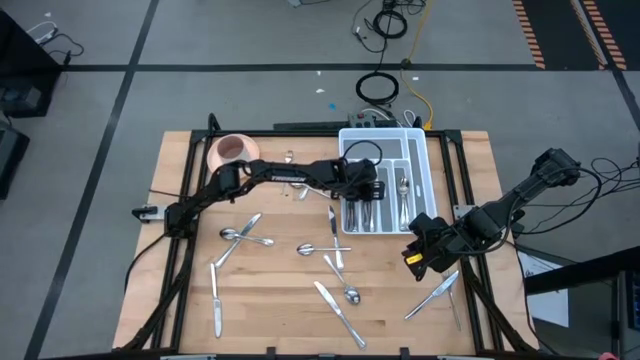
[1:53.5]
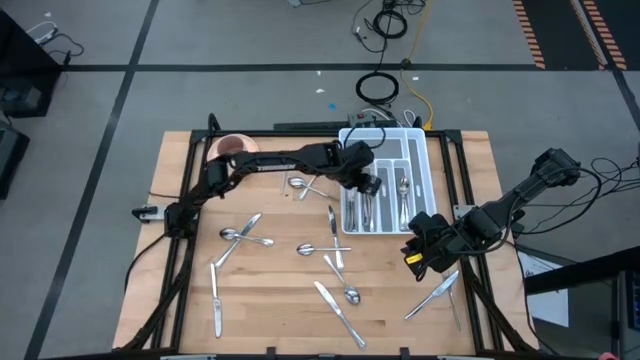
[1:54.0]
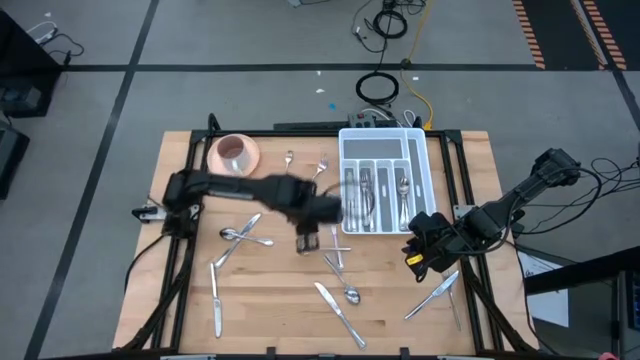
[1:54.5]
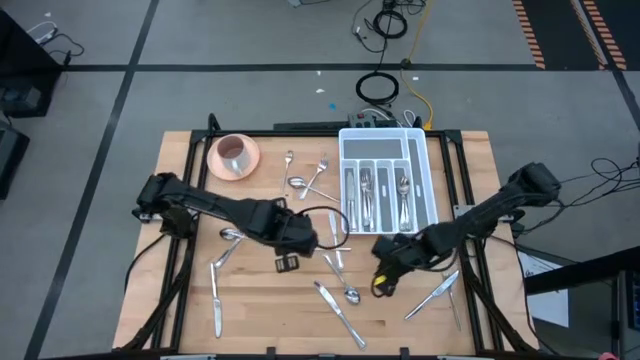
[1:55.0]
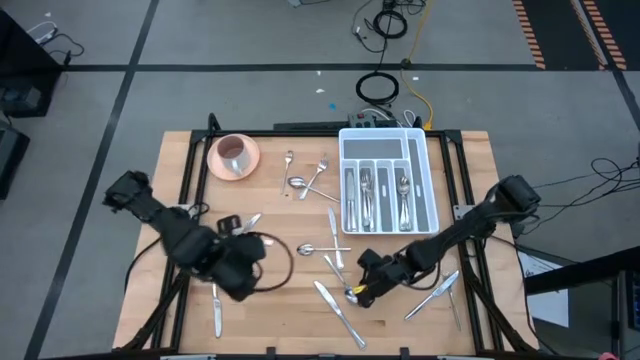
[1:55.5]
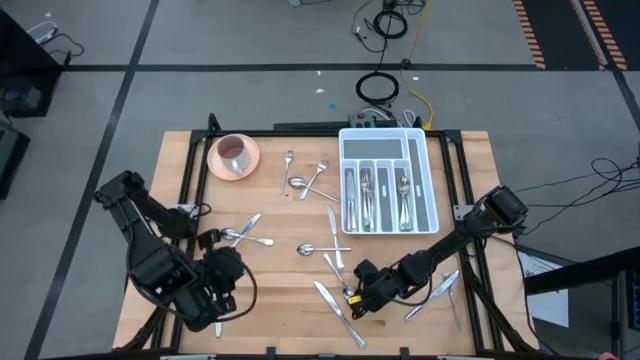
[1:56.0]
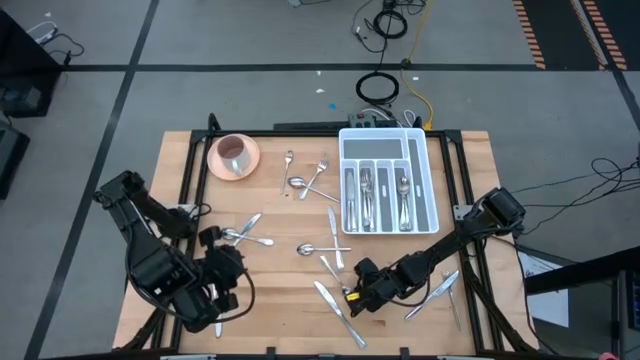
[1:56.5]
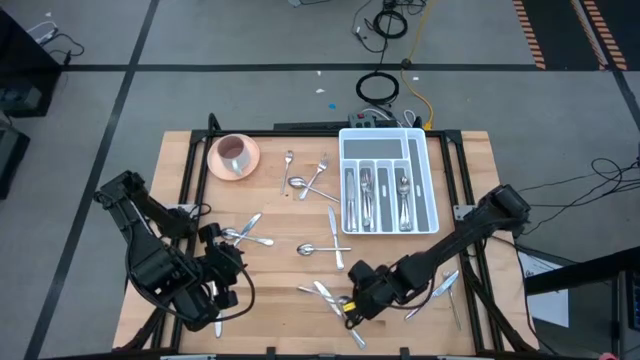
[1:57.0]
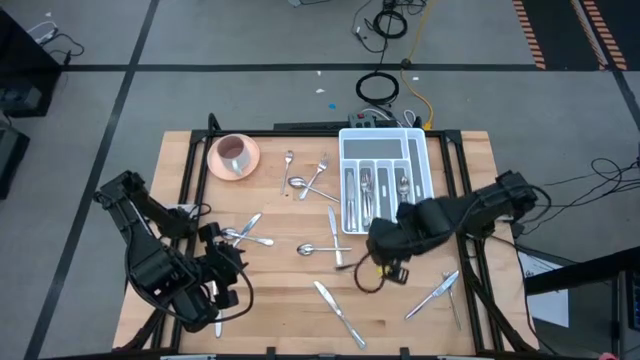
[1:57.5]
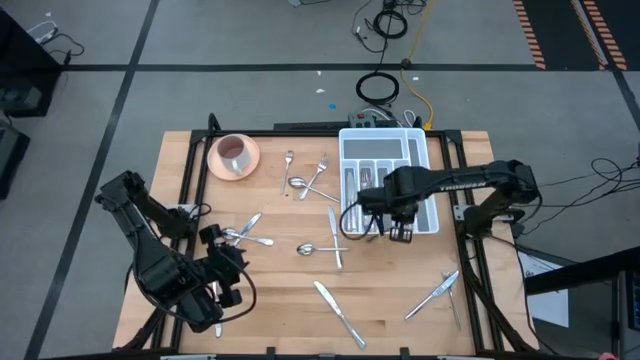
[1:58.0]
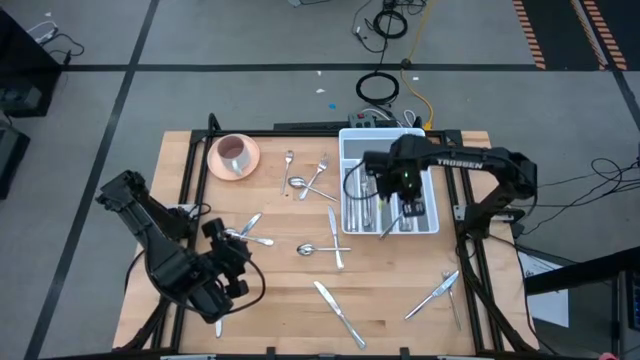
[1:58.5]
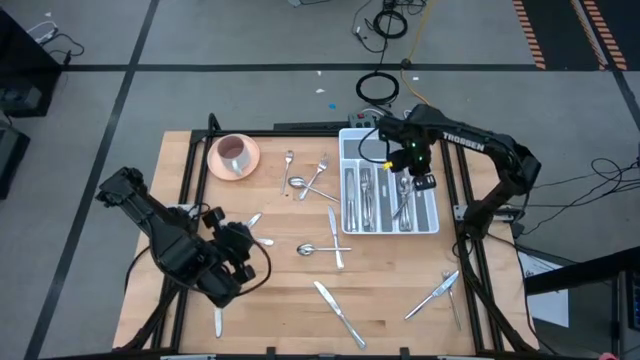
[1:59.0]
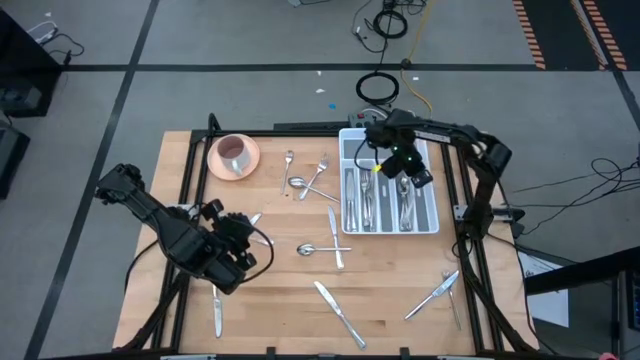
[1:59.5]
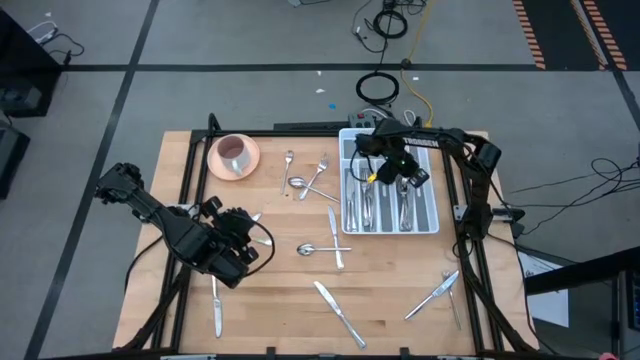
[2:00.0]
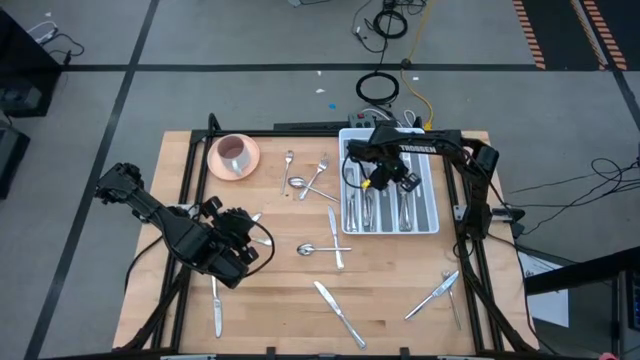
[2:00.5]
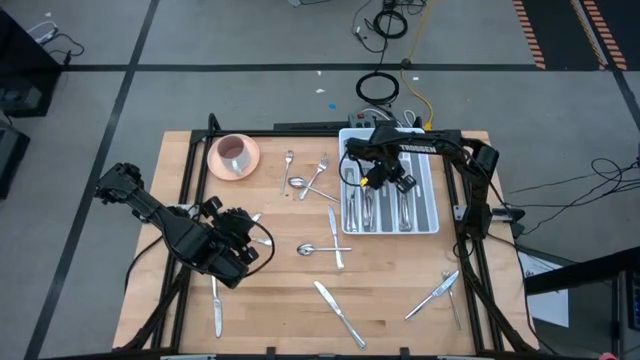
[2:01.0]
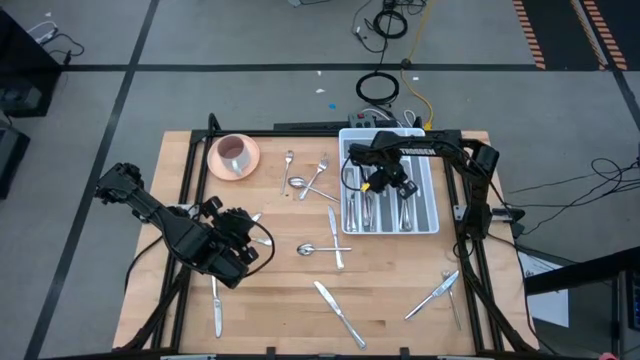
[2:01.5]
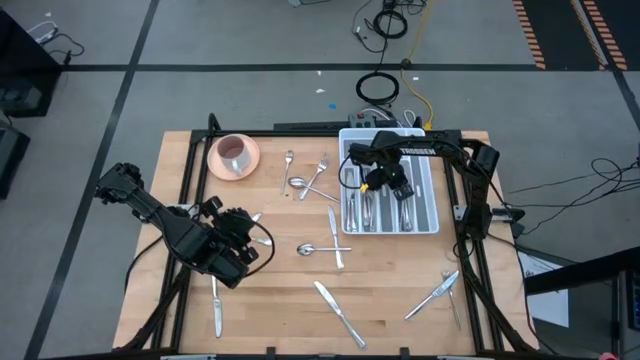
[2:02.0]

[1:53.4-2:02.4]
Task: Sort silverware
Put the silver spoon into the white silverware tray

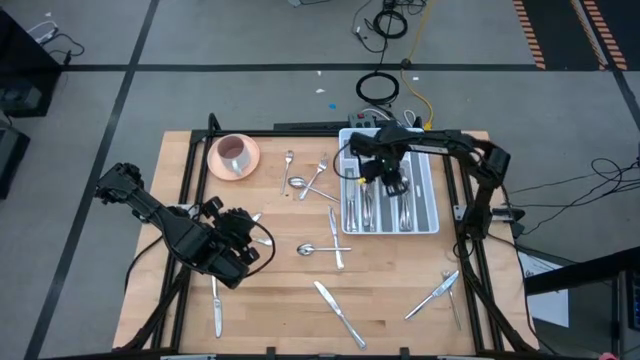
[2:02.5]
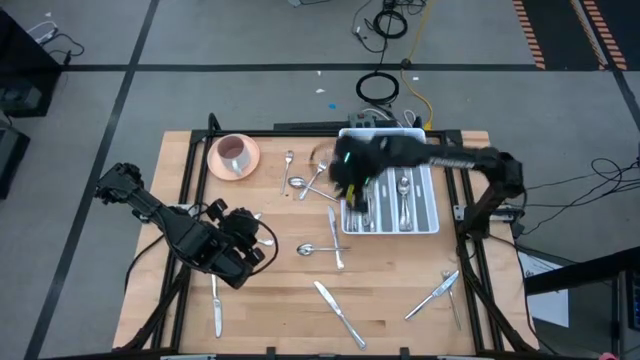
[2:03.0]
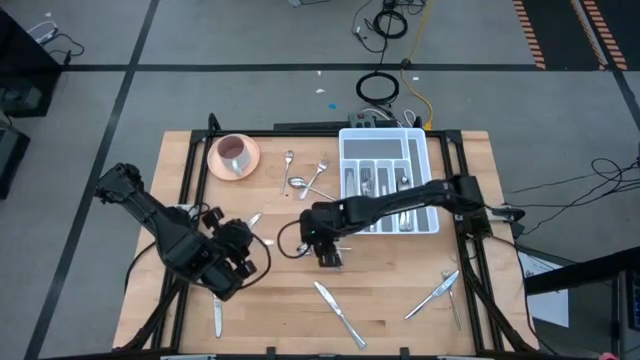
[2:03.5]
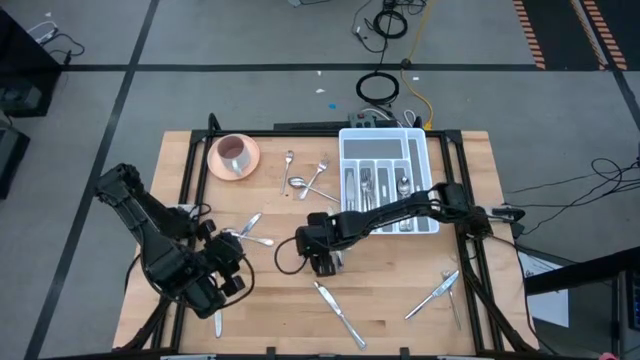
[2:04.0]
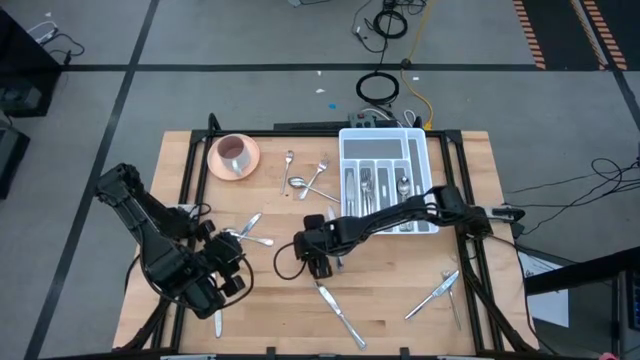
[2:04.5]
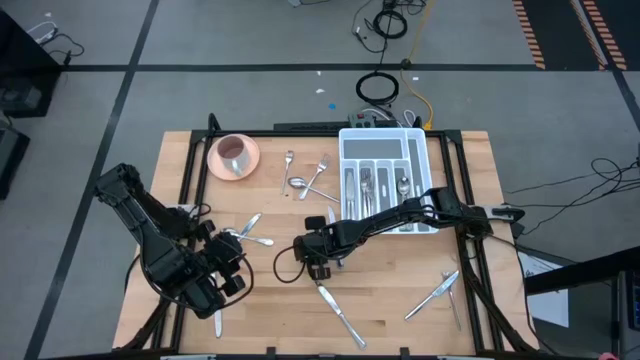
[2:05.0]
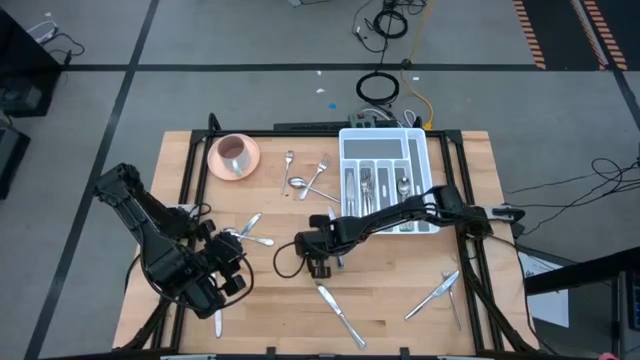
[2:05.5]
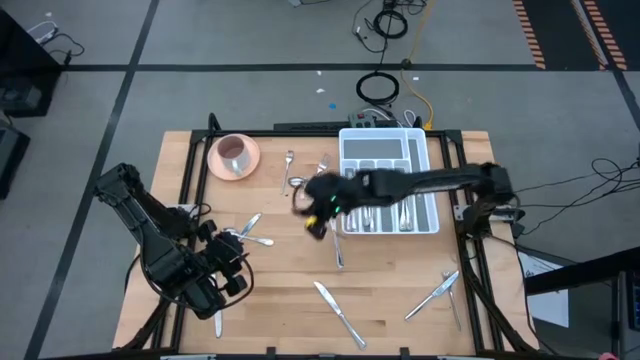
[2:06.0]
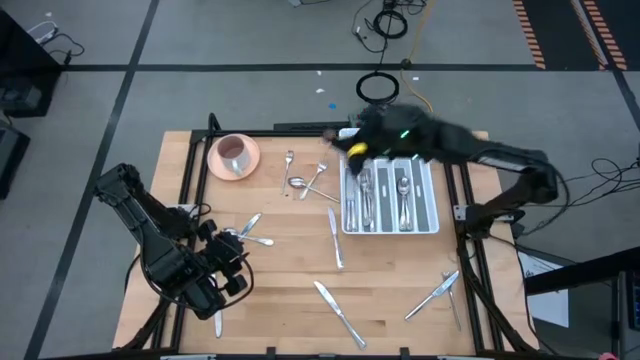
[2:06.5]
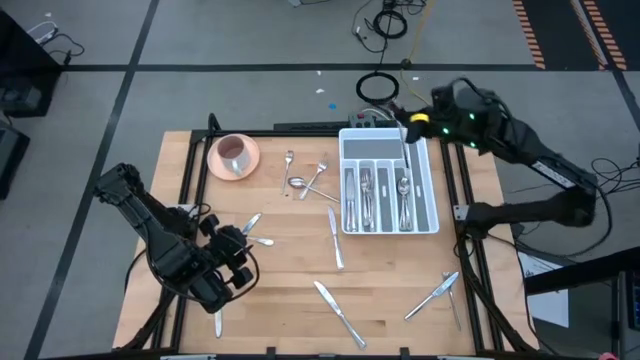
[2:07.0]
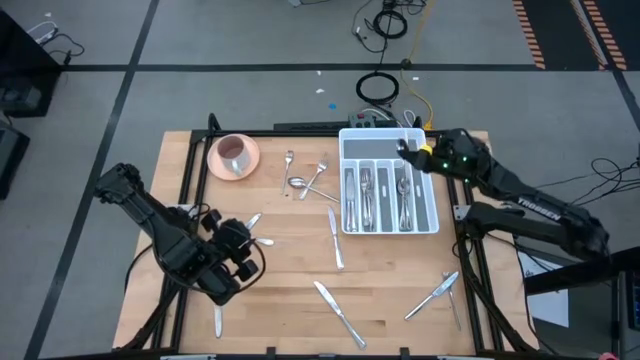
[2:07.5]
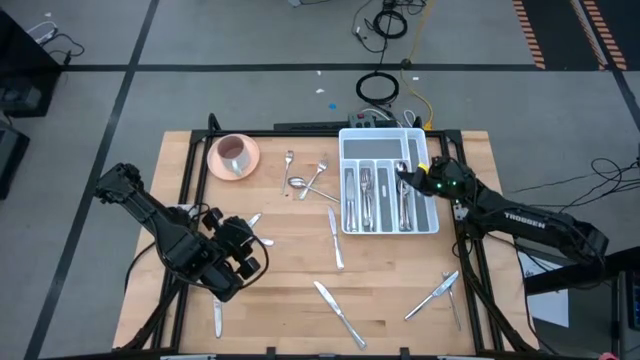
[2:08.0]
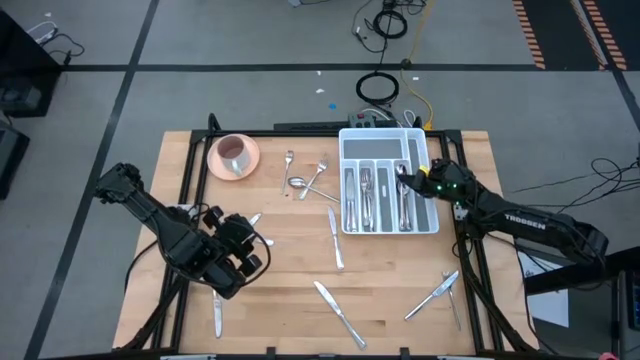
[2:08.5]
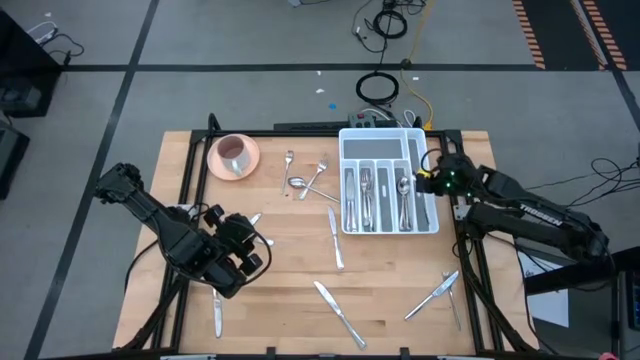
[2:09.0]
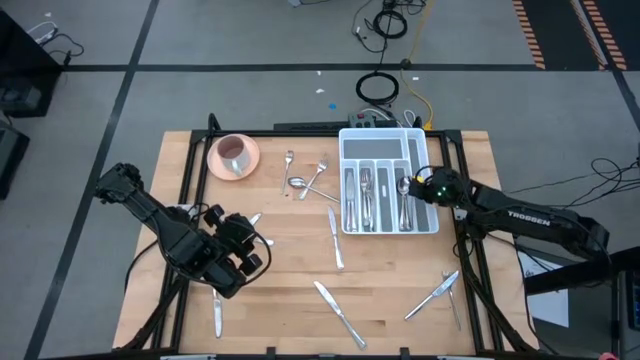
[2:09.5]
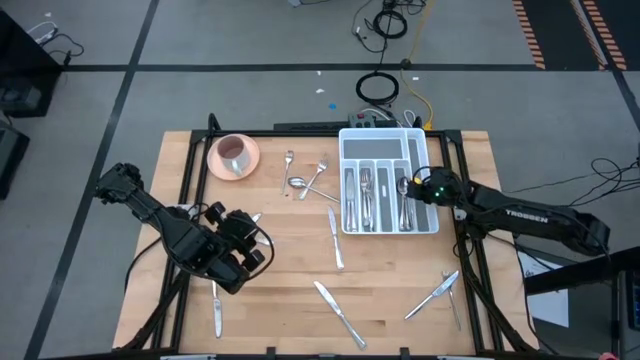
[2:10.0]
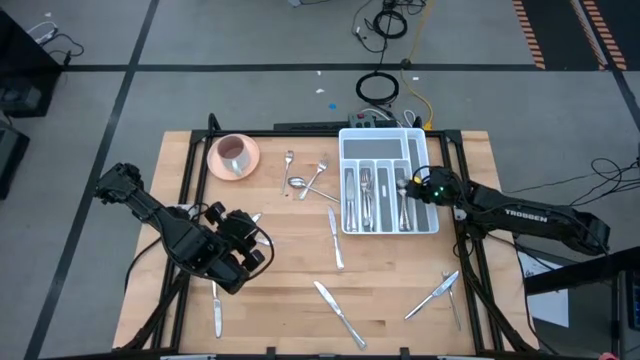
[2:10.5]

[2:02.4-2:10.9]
Put the silver spoon into the white silverware tray

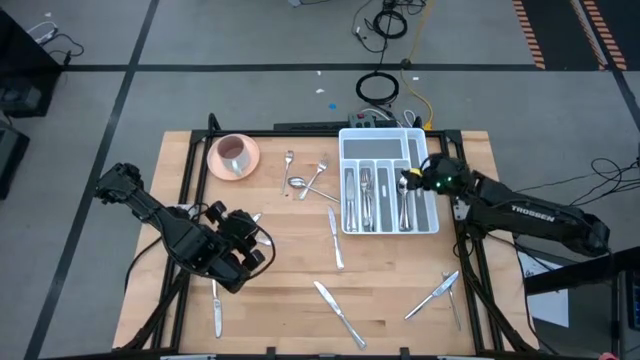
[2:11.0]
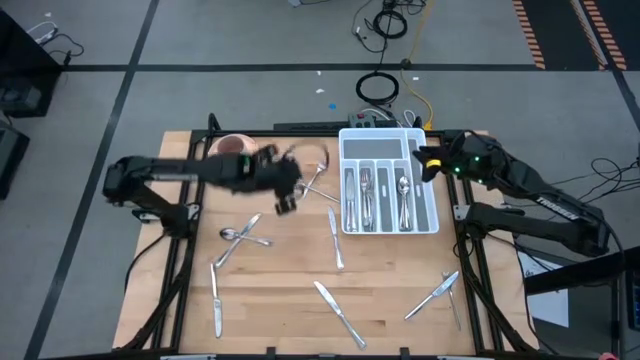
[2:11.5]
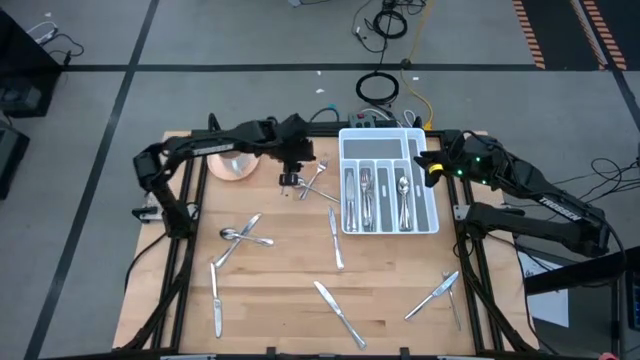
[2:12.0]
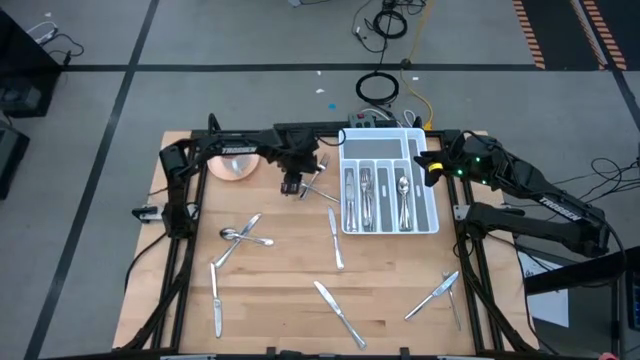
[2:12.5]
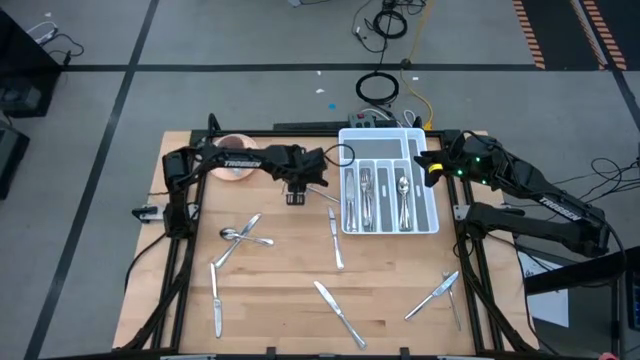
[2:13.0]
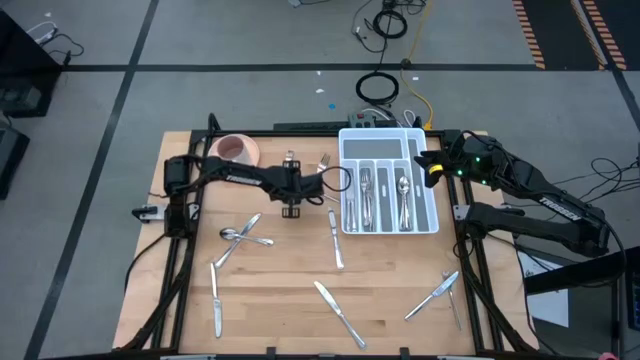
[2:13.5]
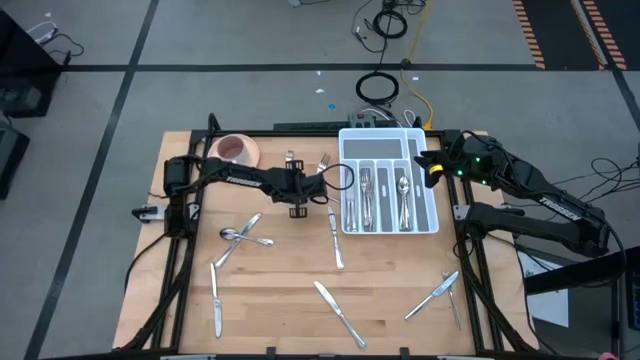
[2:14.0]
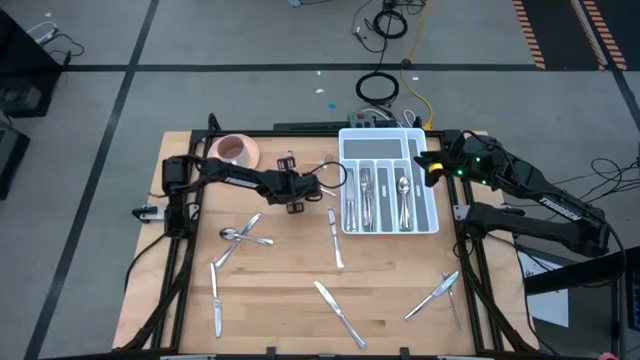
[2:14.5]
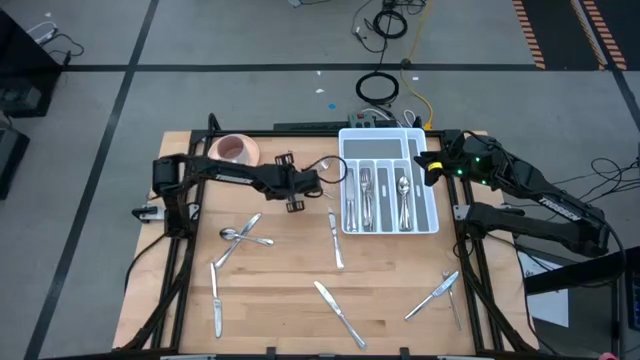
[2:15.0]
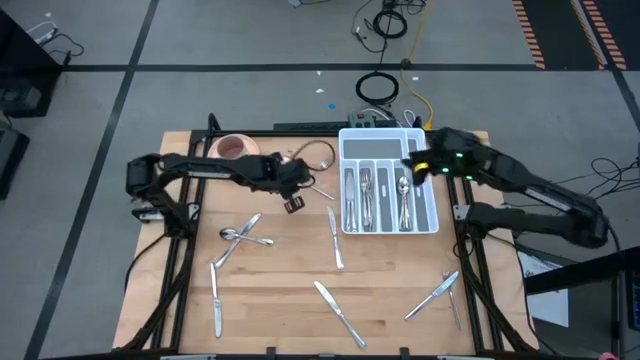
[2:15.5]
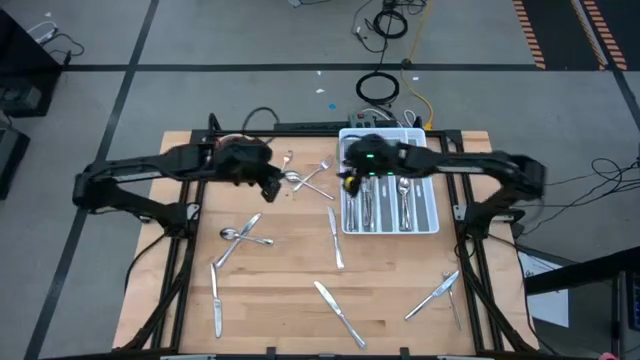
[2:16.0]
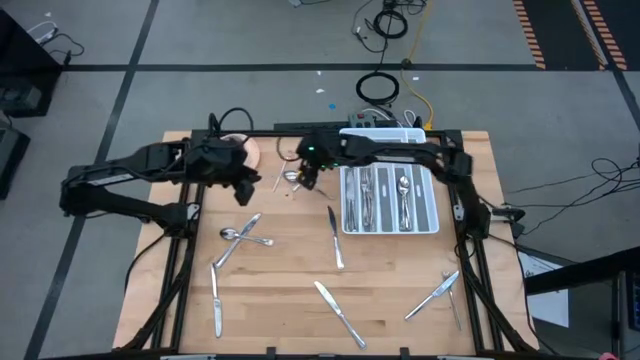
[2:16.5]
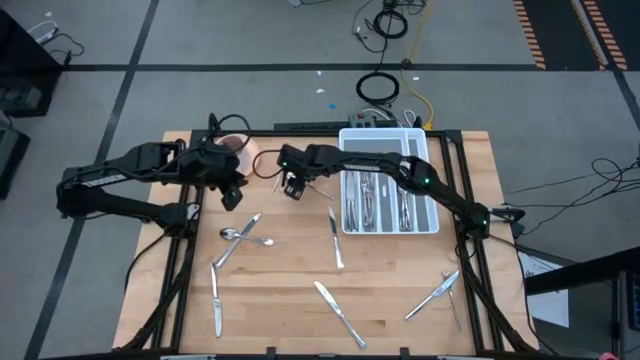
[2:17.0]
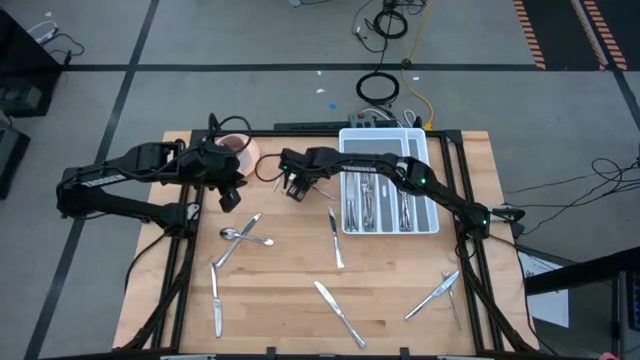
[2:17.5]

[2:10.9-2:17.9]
Put the silver spoon into the white silverware tray
